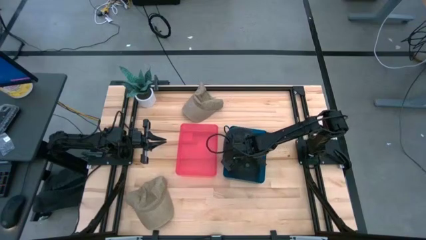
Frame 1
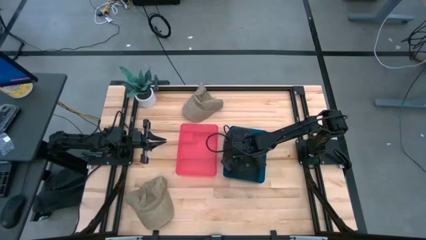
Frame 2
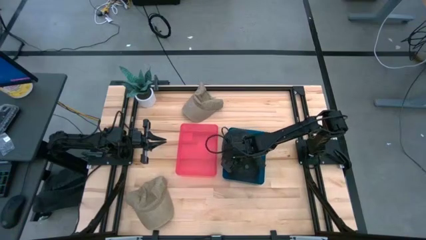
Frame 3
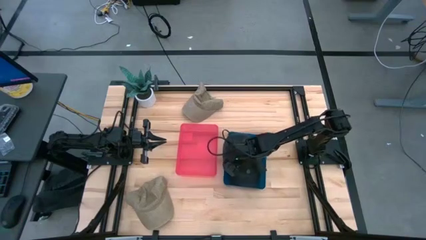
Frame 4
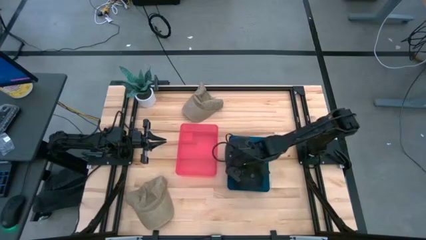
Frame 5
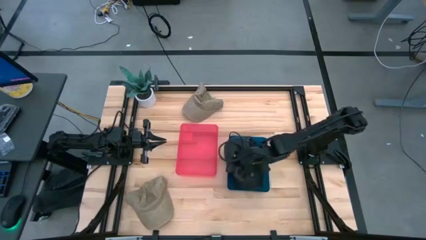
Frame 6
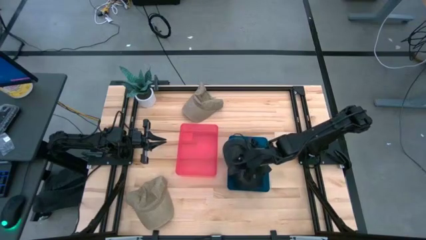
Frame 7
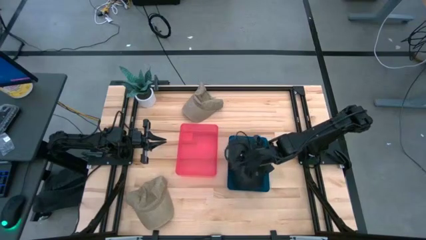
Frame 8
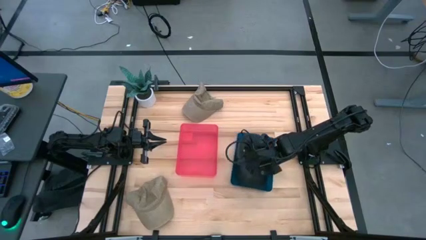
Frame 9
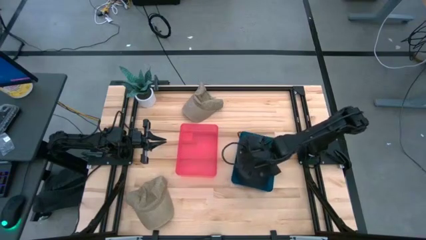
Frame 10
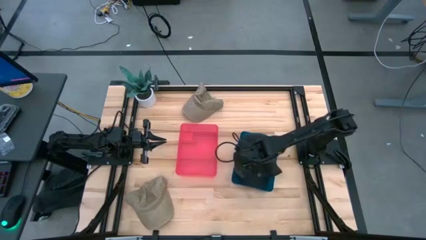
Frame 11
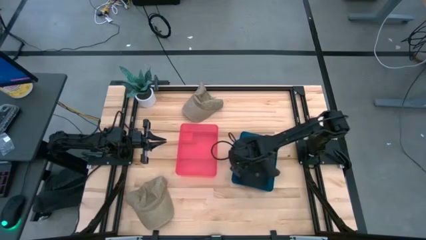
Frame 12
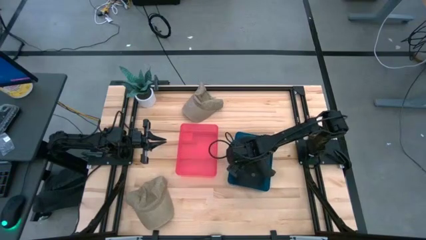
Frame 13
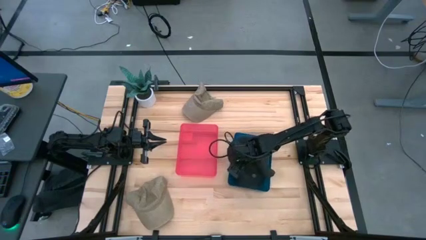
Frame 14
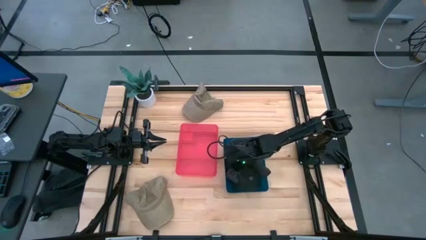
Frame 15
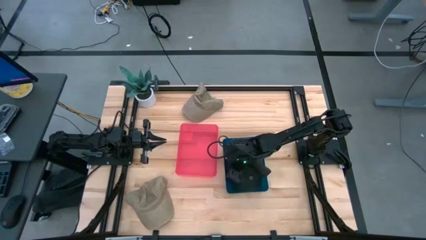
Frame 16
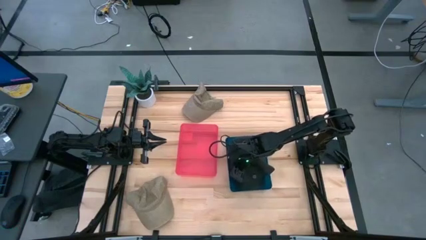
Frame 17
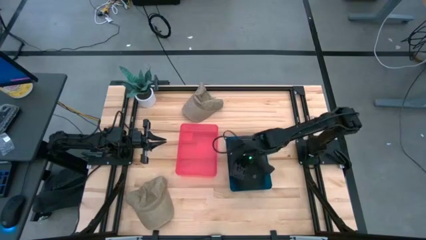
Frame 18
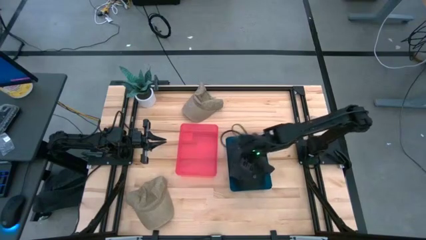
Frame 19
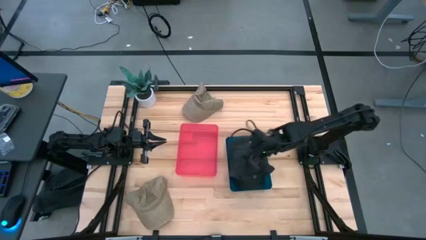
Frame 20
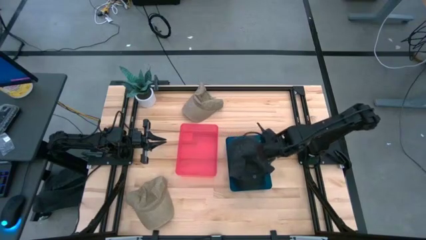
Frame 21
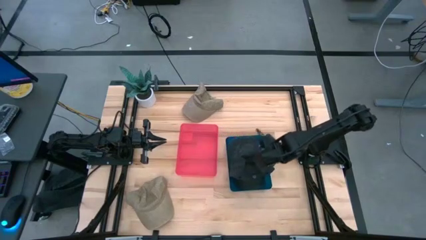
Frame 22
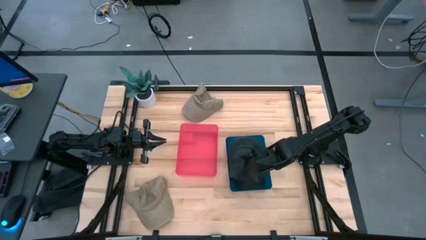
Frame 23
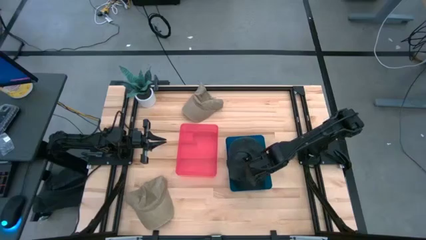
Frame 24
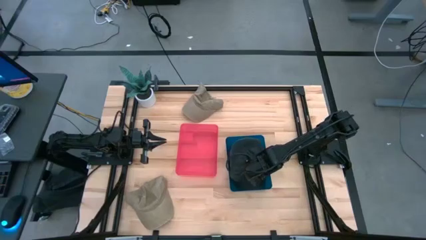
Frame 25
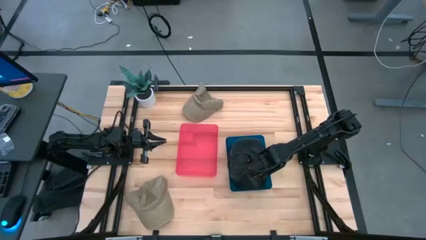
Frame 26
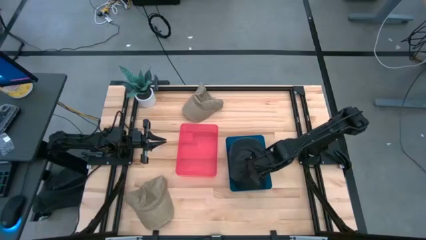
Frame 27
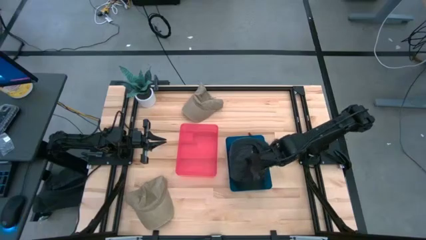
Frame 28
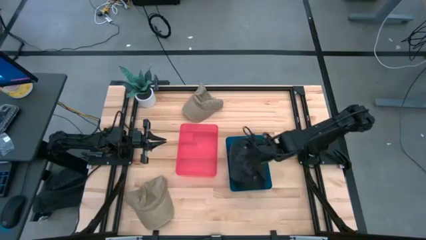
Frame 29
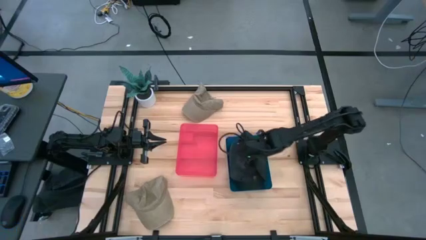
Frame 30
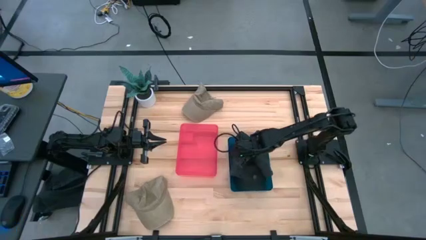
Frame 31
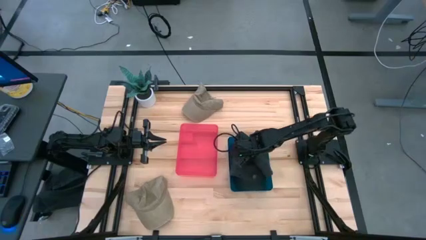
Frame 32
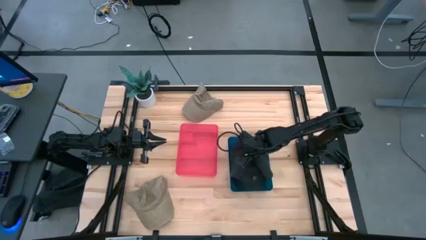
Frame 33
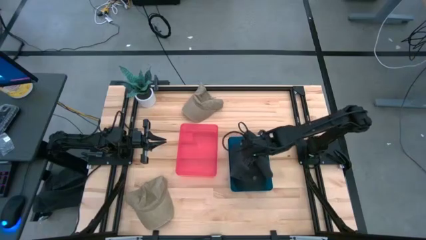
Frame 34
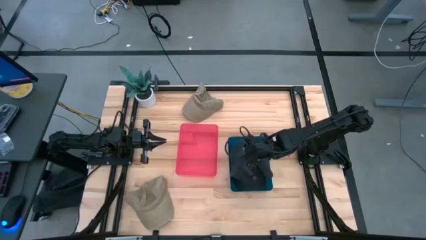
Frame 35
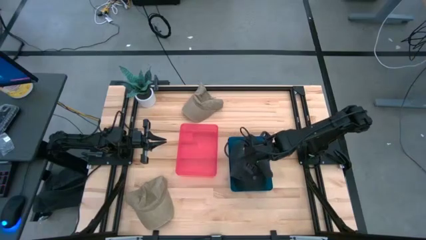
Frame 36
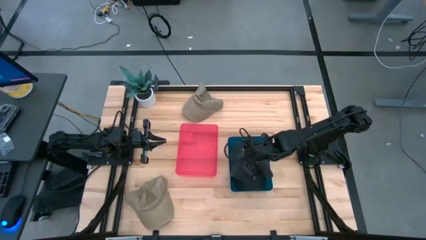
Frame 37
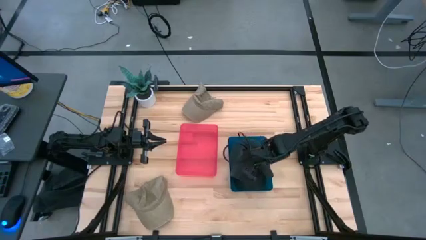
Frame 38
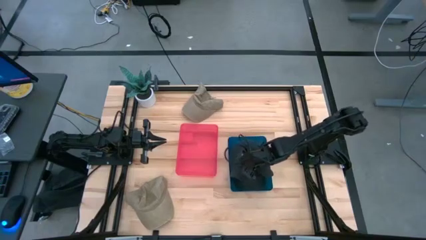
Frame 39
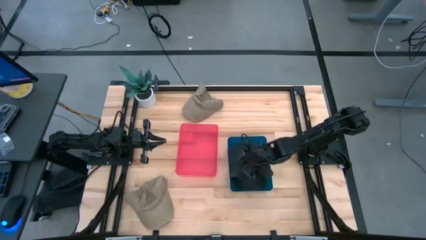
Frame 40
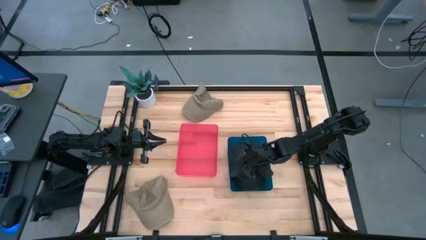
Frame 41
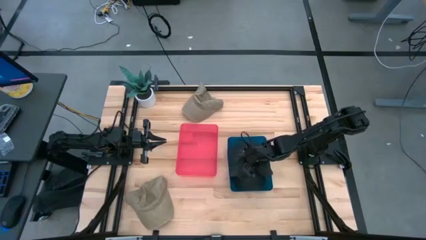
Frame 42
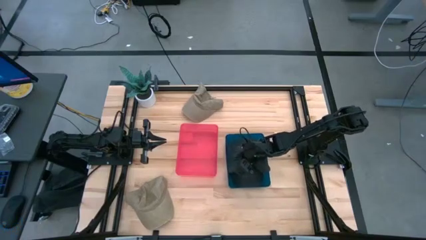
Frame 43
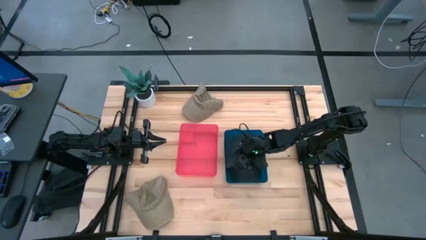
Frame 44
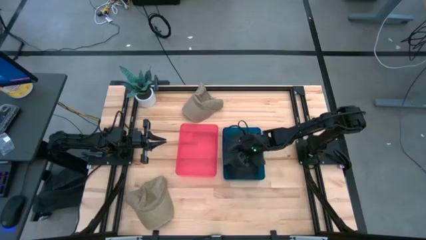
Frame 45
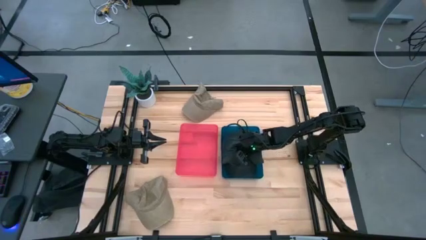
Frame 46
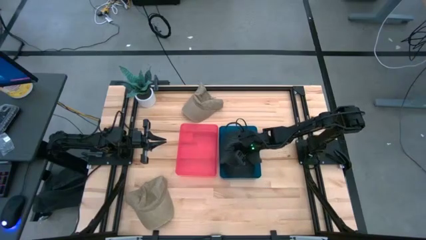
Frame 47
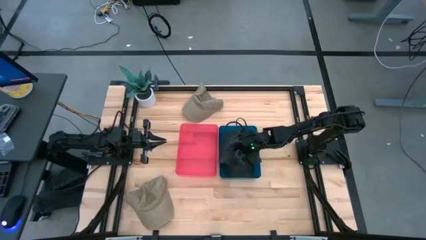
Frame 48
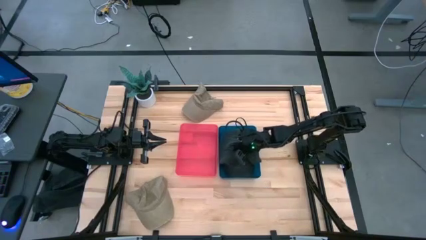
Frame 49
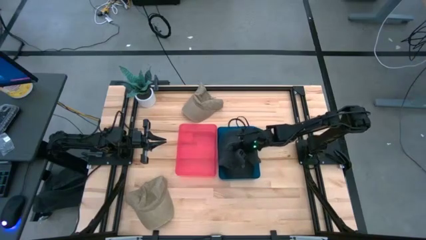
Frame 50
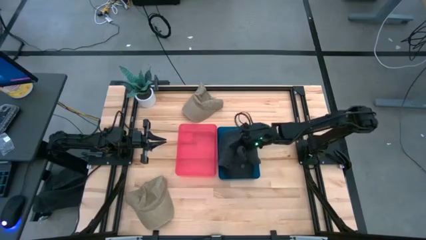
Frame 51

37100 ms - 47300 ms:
Task: Pick & Place hat
Put the gray cap into the blue bin
